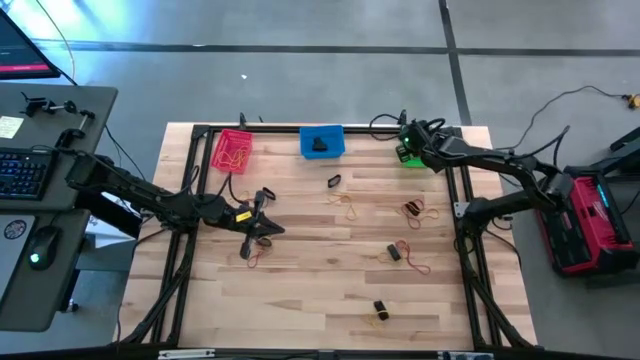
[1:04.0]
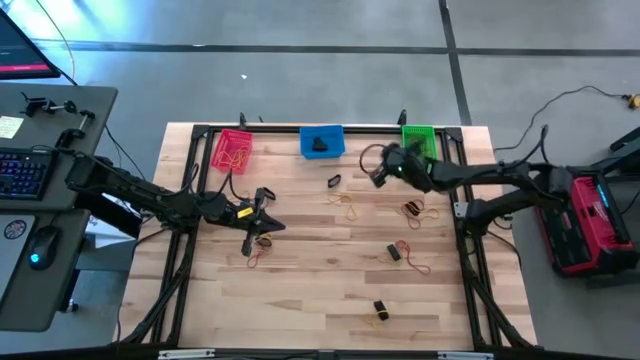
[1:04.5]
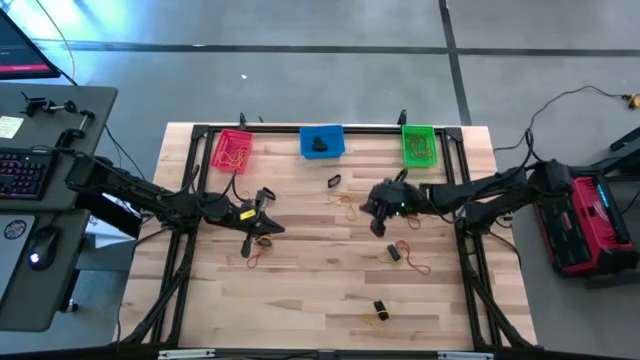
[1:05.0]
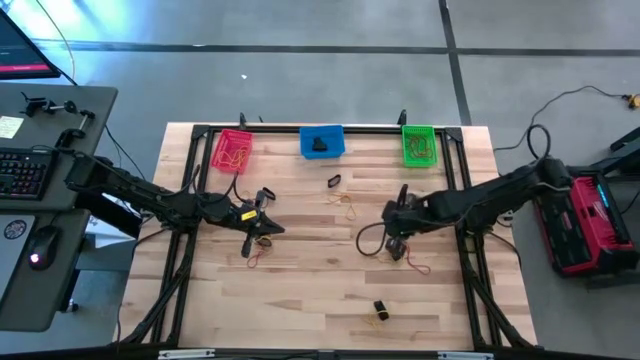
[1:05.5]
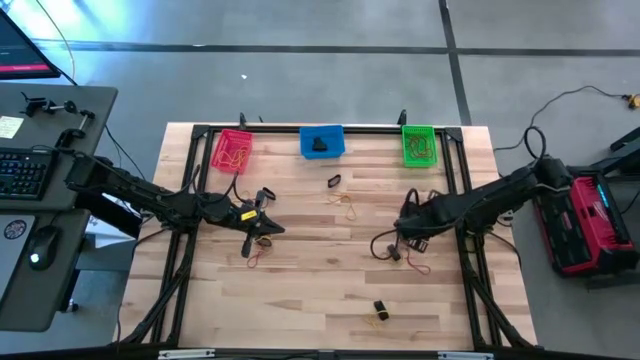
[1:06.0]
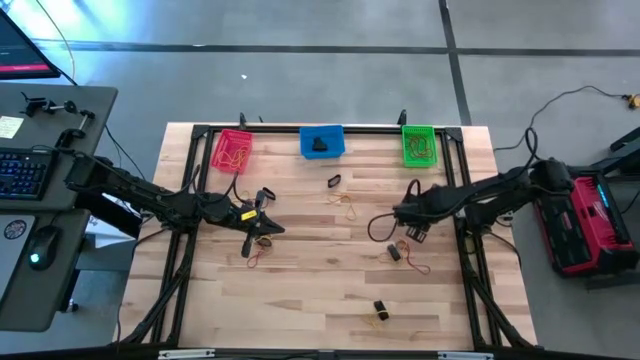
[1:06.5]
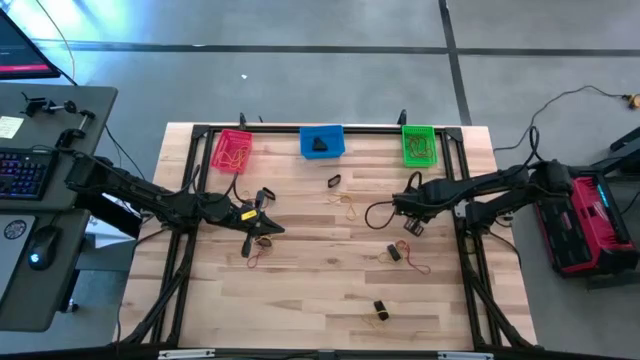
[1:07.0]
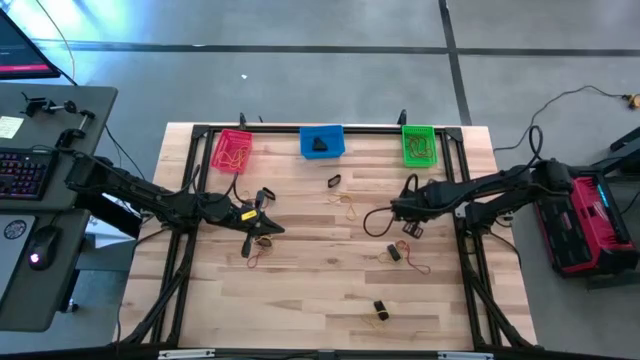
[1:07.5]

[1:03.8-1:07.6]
Task: Sort rubber bands into baskets
Put the yellow rubber band into the red bin

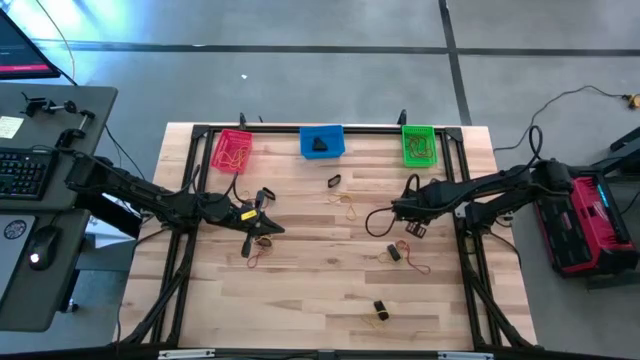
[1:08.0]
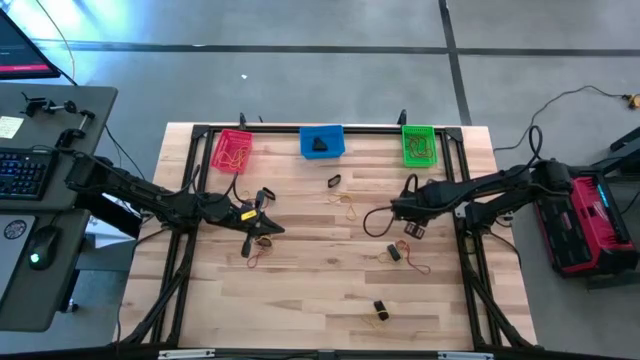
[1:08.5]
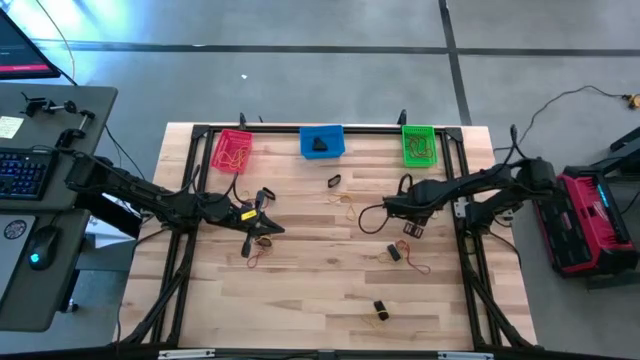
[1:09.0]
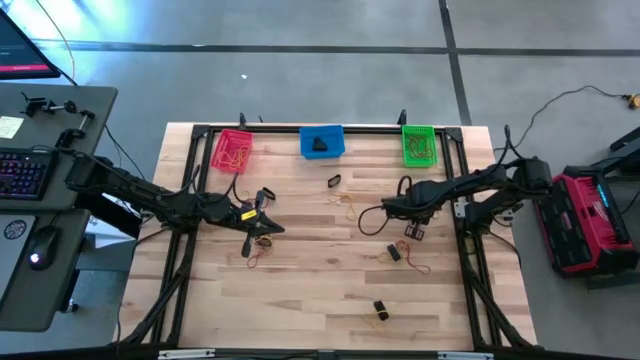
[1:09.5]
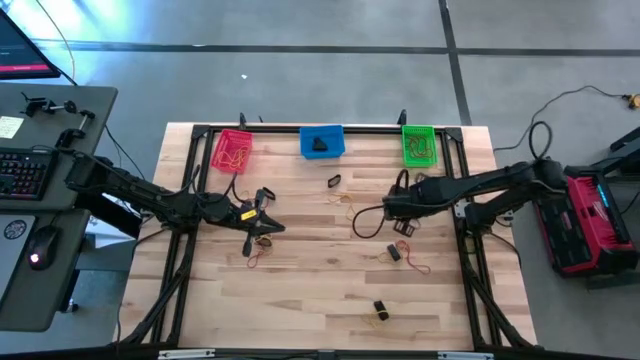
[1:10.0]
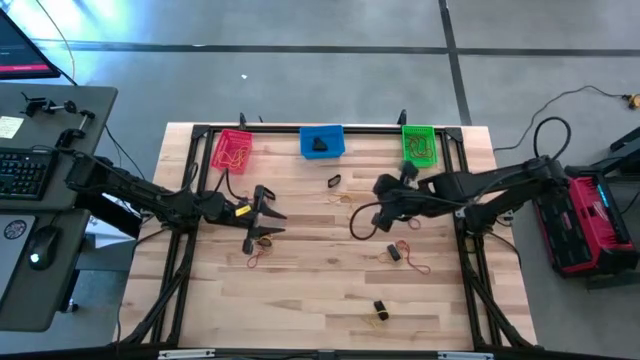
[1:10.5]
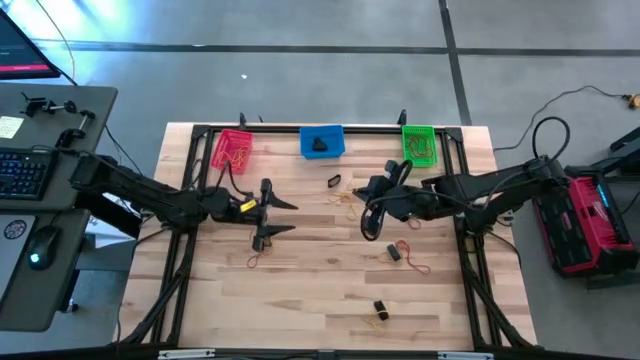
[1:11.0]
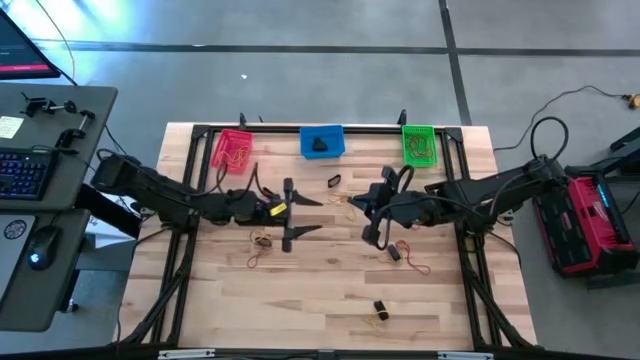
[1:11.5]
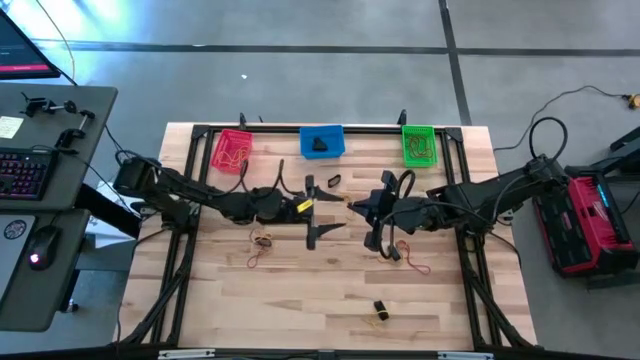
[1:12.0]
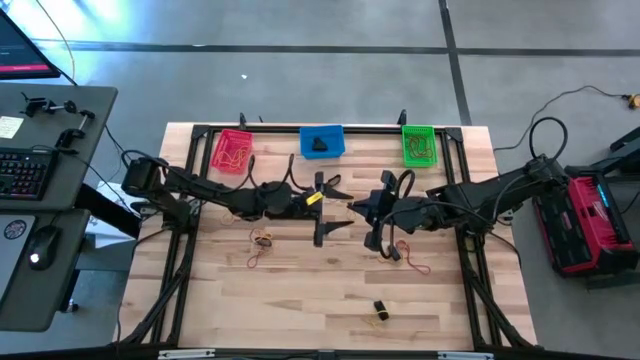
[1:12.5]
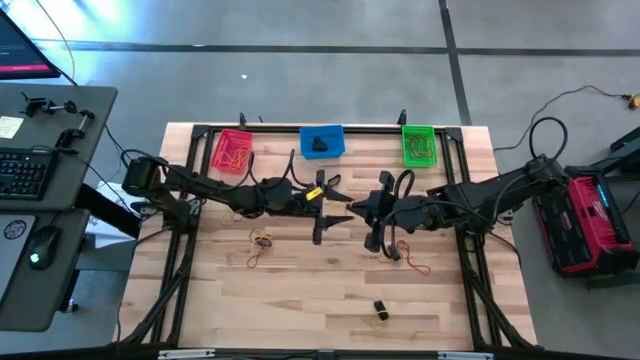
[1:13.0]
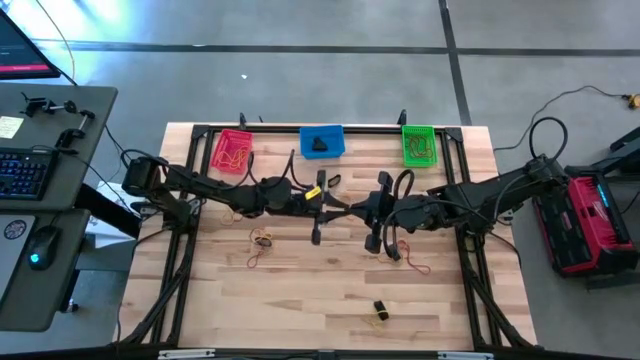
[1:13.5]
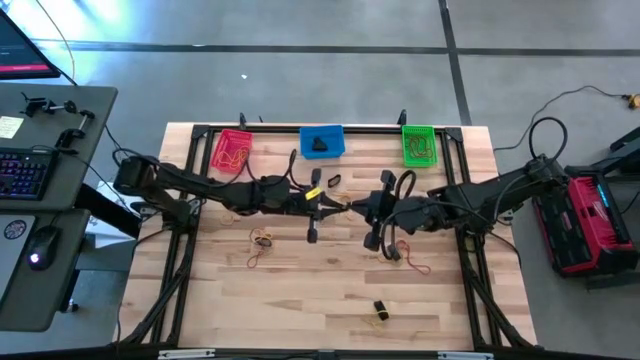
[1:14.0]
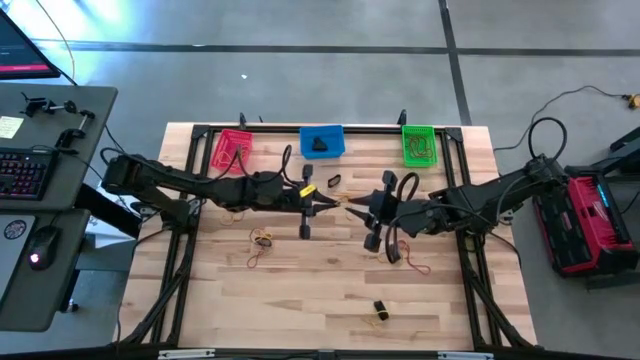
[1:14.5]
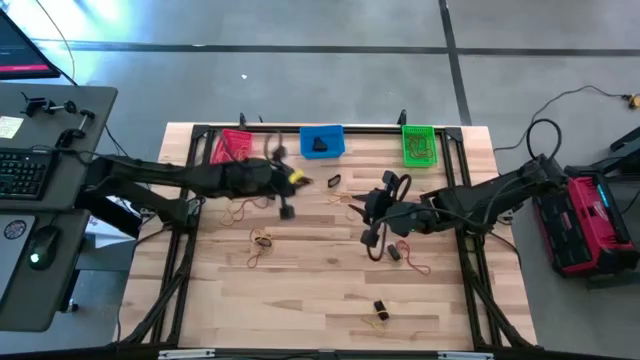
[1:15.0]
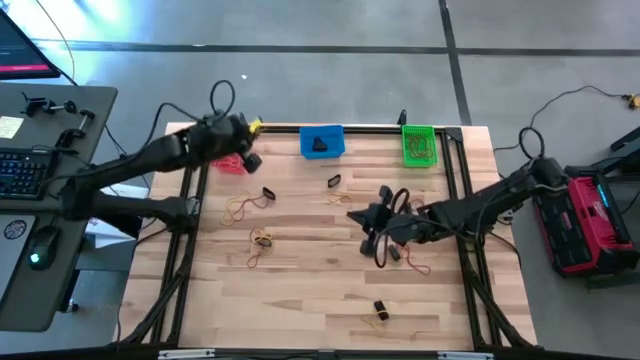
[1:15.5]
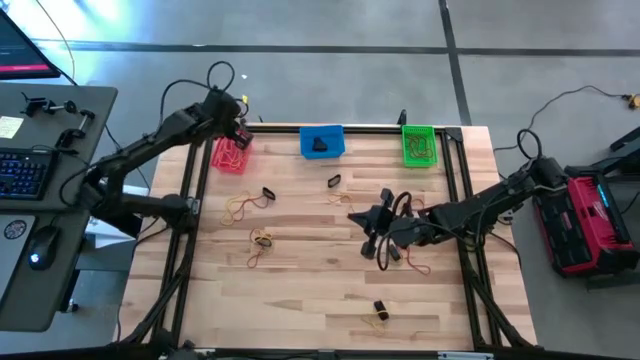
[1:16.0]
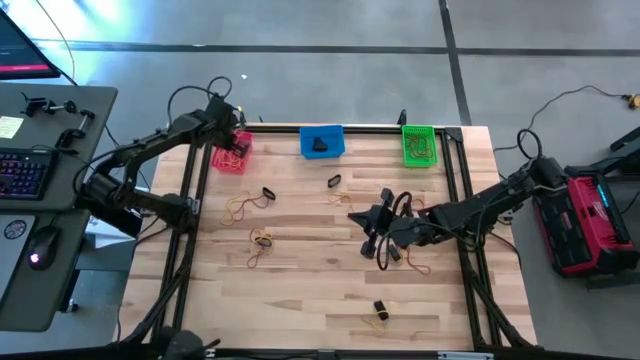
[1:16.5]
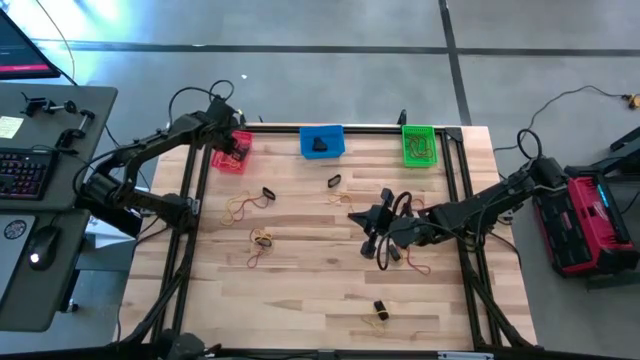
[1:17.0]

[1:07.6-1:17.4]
Put the yellow rubber band into the red bin

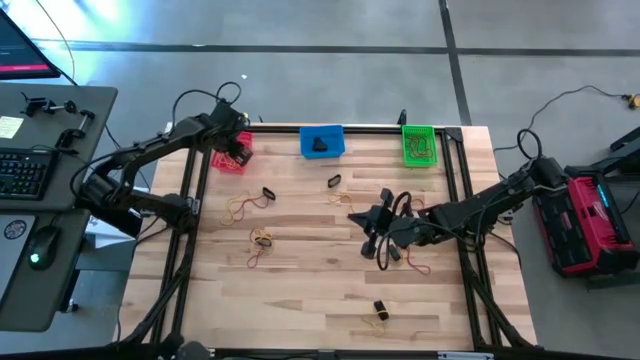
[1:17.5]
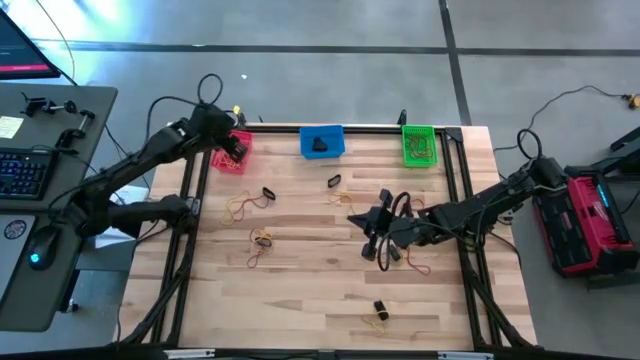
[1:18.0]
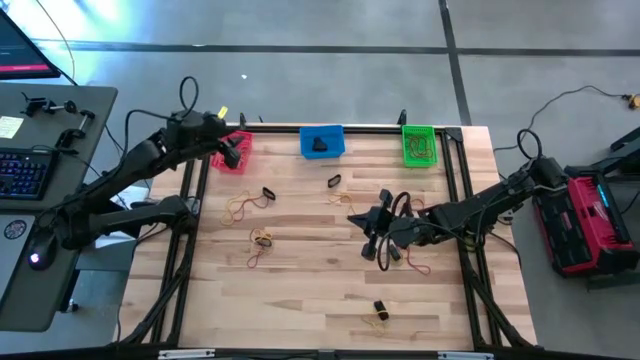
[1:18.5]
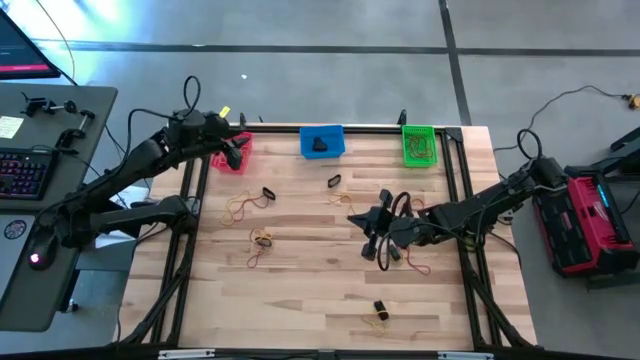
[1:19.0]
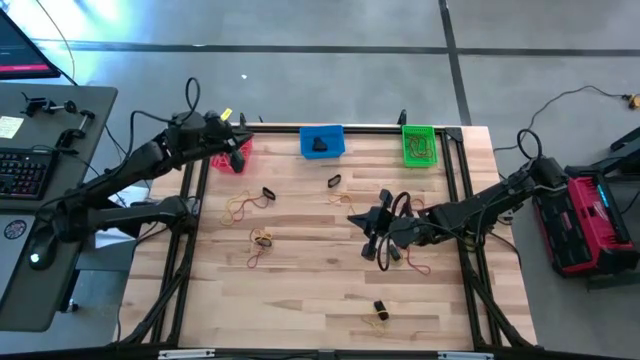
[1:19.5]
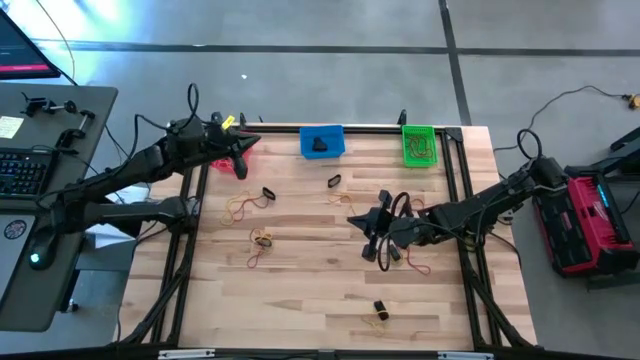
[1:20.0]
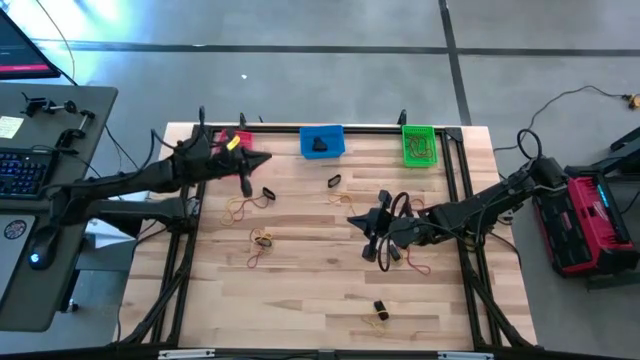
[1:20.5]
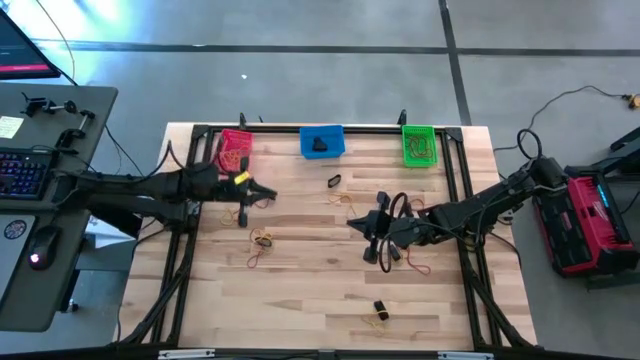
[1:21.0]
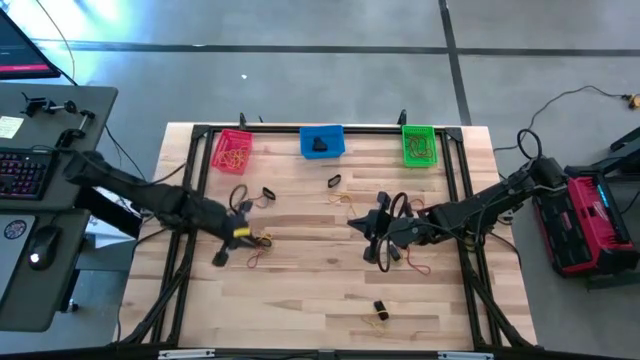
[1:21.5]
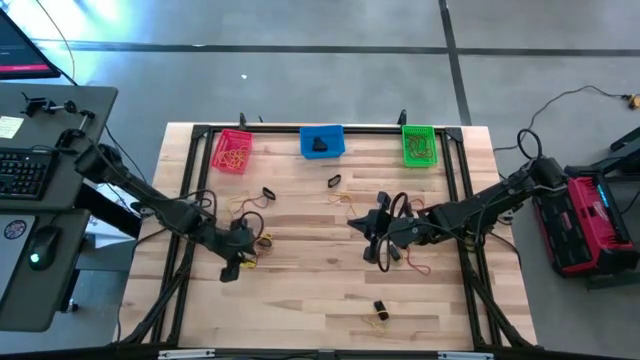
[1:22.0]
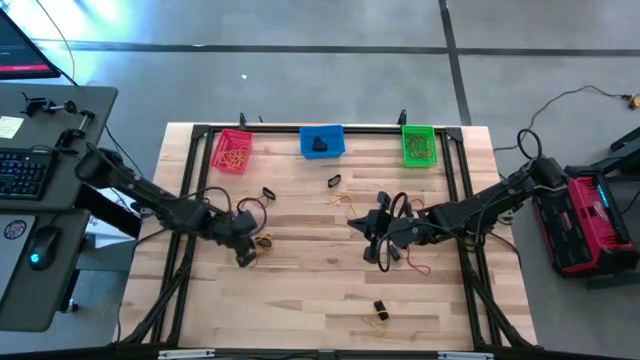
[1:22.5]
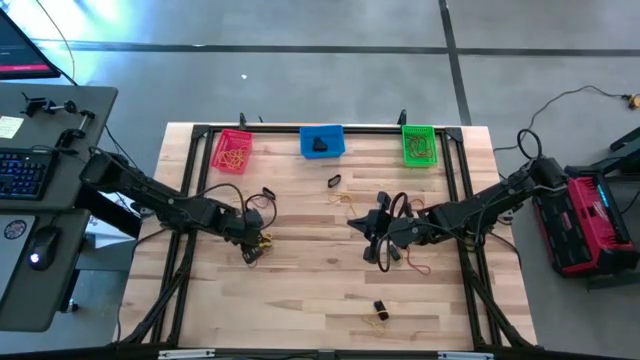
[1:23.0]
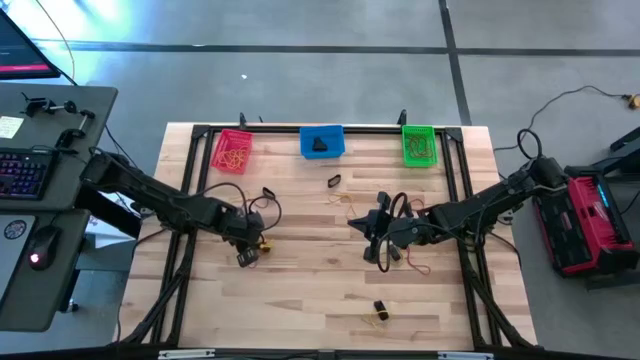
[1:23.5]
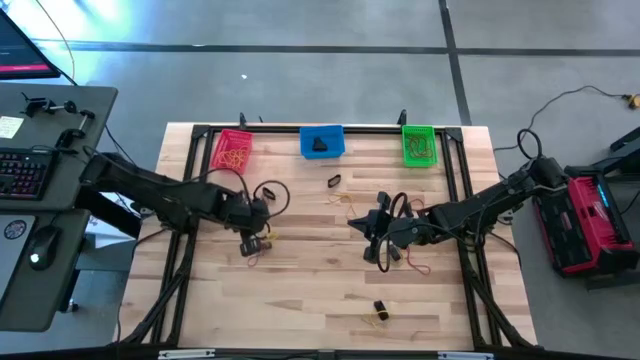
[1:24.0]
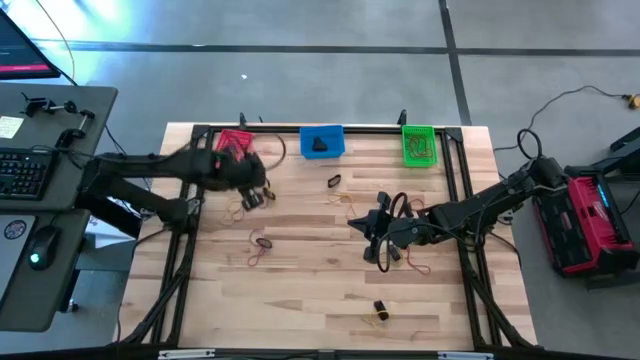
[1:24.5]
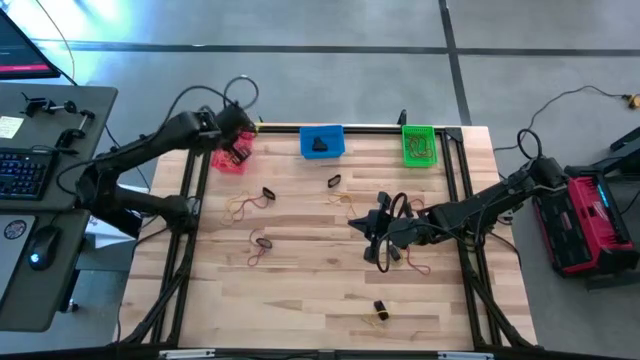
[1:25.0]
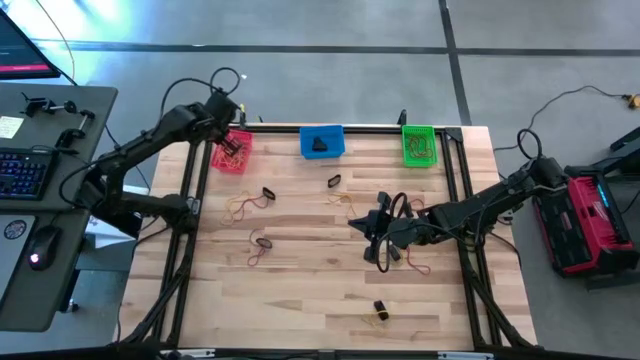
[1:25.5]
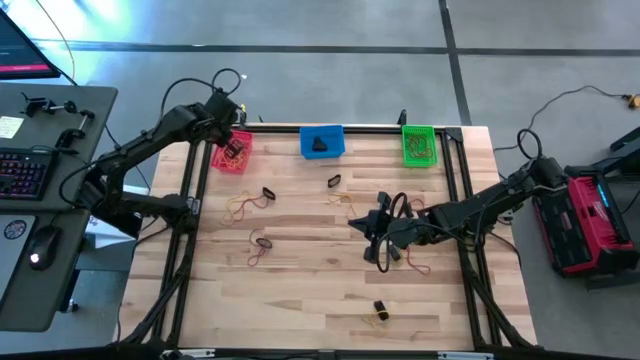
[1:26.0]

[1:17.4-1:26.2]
Put the yellow rubber band into the left red bin
